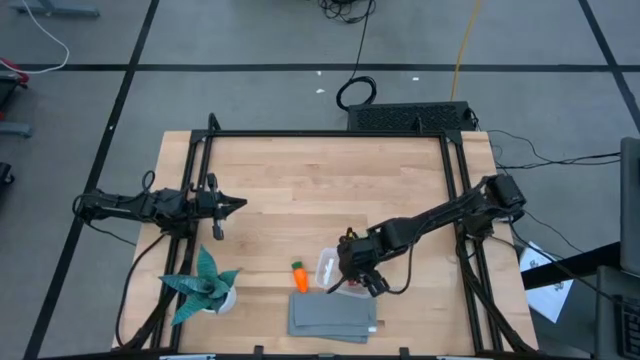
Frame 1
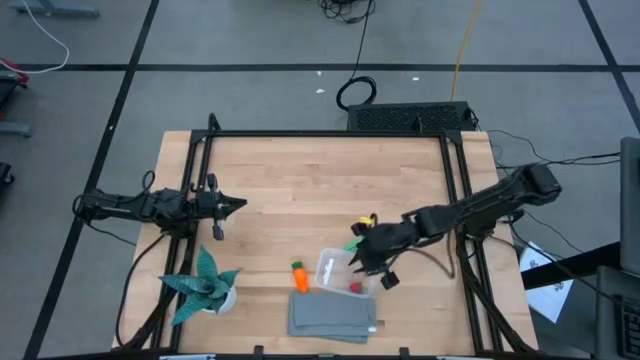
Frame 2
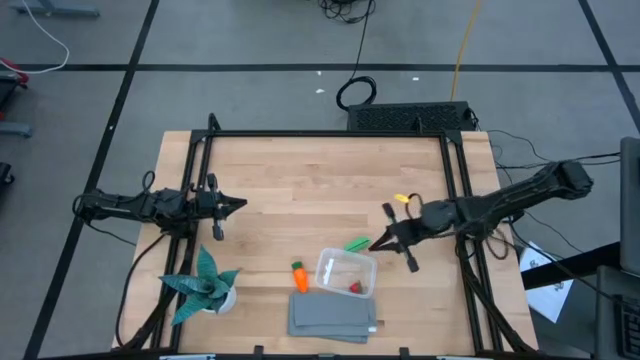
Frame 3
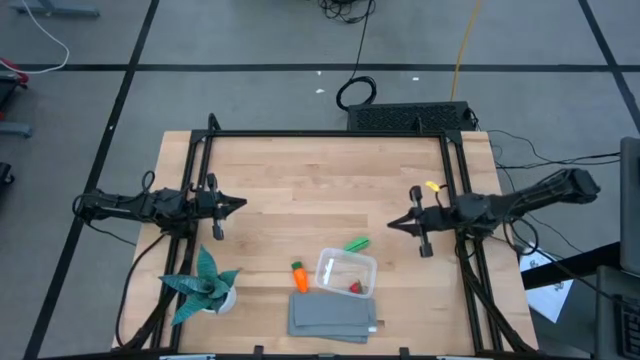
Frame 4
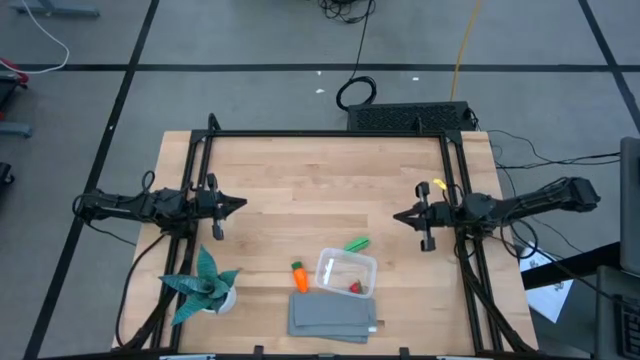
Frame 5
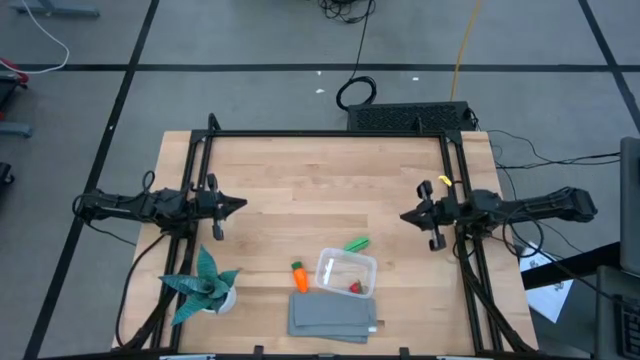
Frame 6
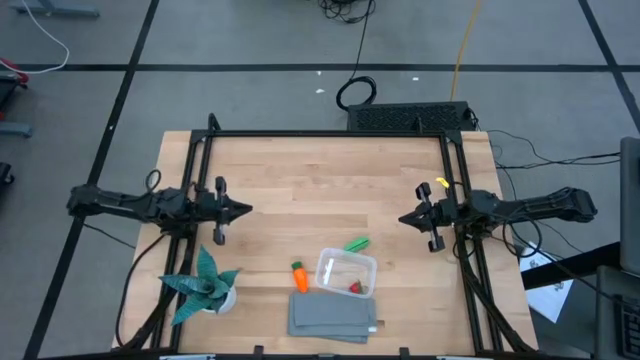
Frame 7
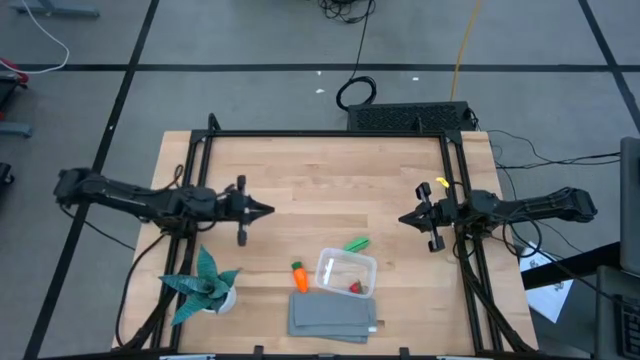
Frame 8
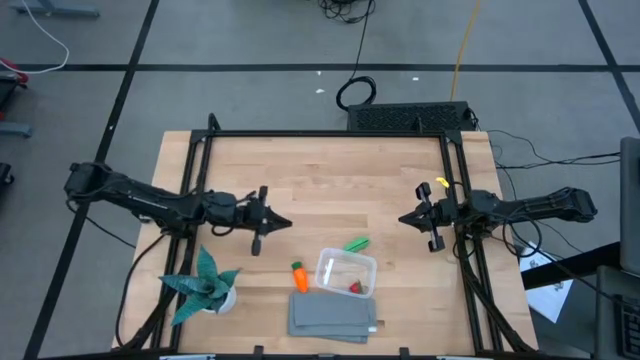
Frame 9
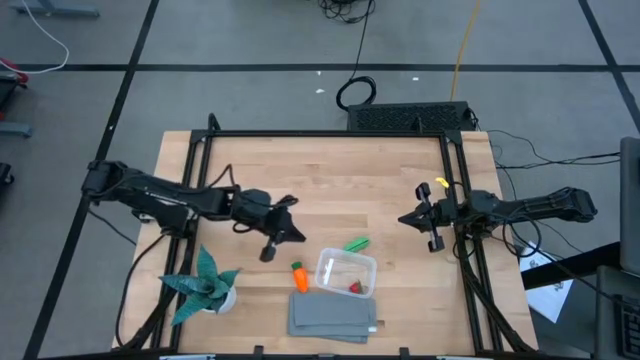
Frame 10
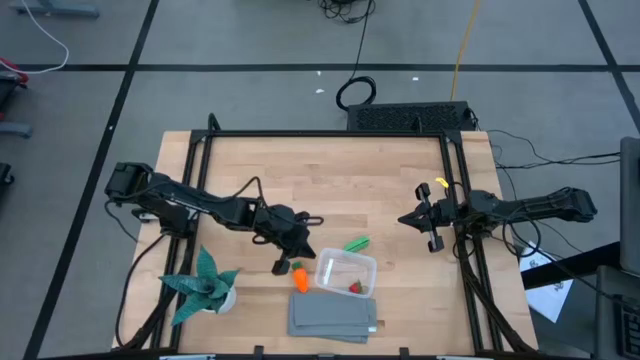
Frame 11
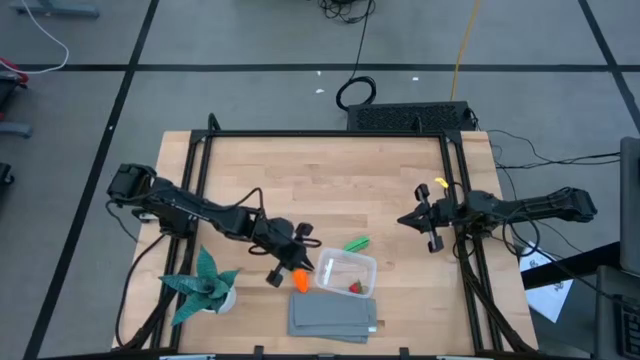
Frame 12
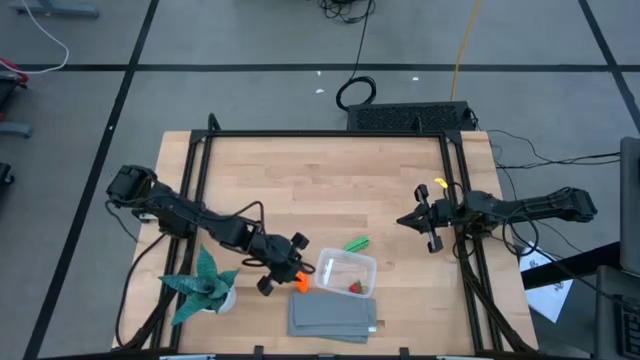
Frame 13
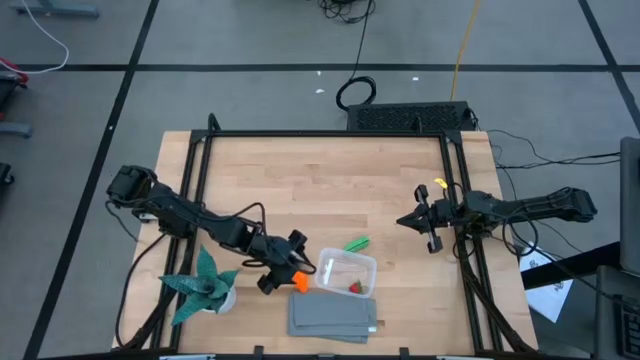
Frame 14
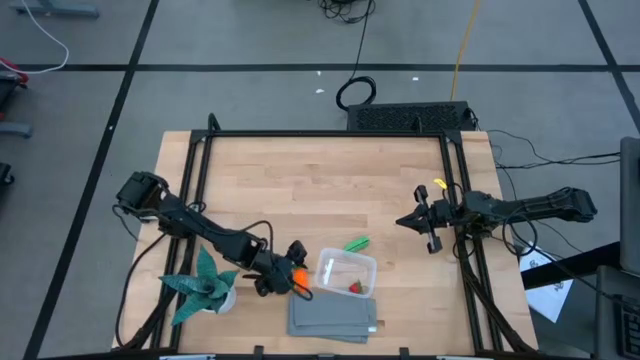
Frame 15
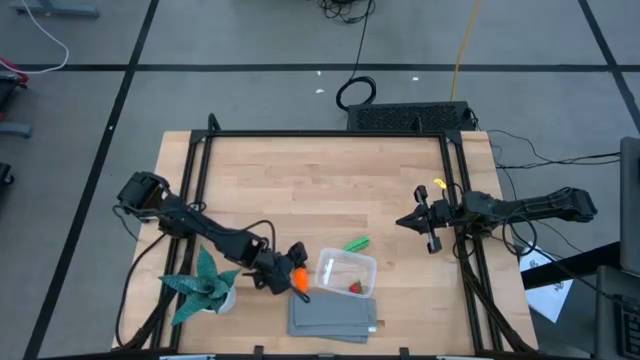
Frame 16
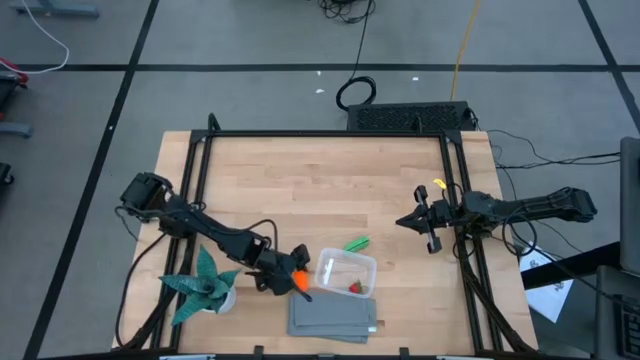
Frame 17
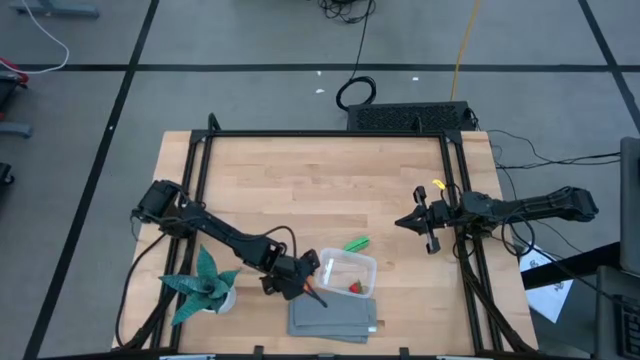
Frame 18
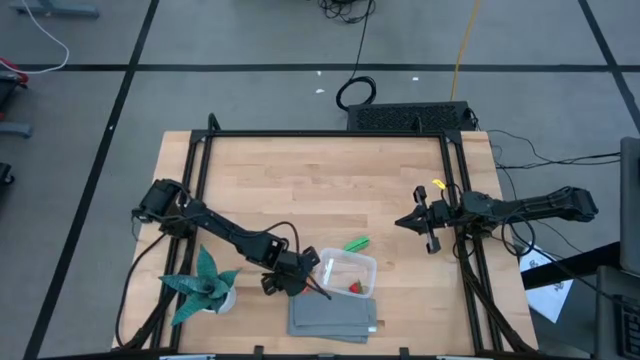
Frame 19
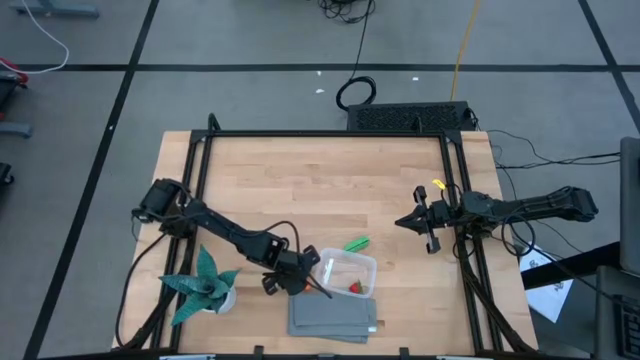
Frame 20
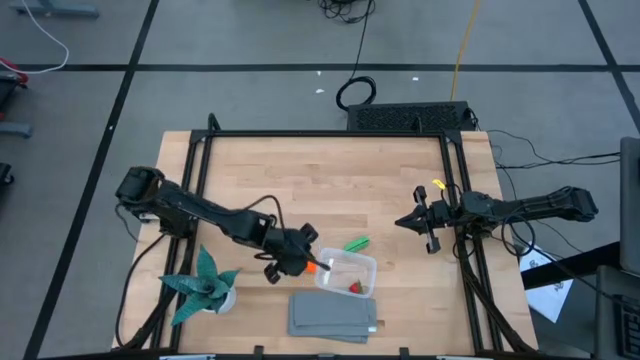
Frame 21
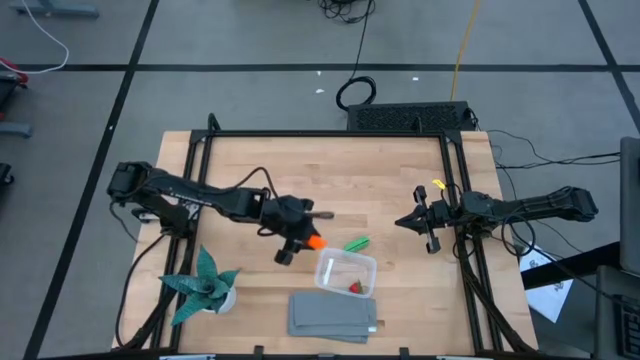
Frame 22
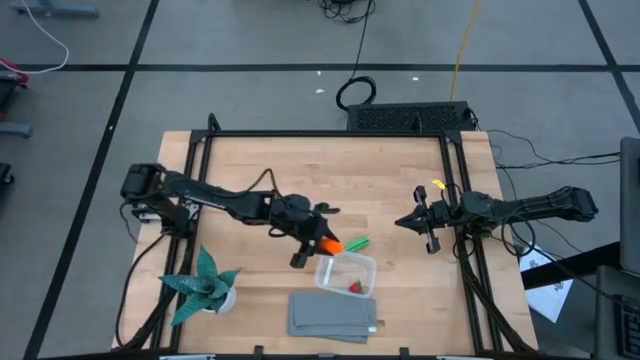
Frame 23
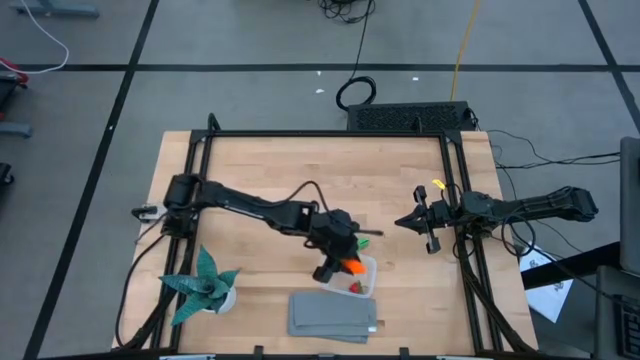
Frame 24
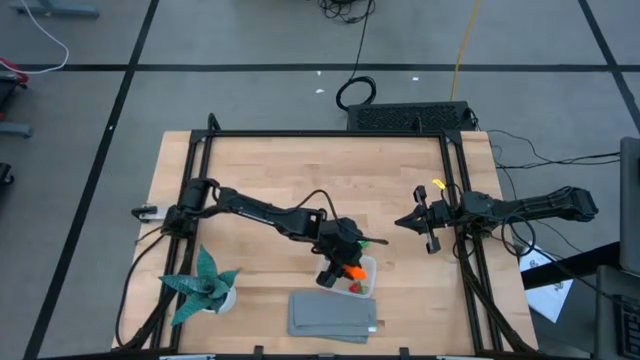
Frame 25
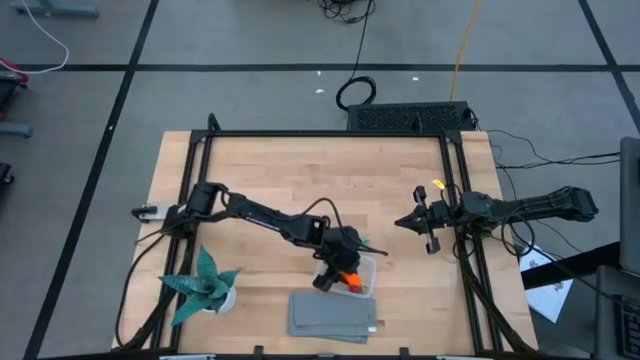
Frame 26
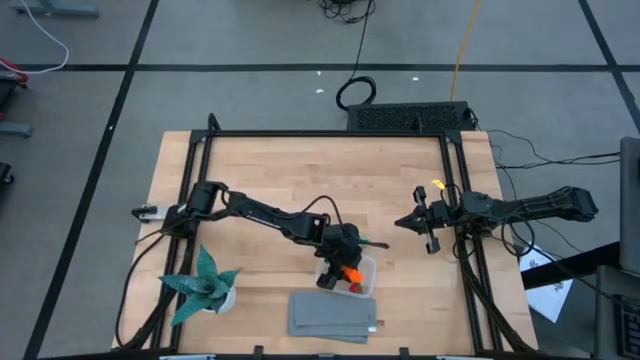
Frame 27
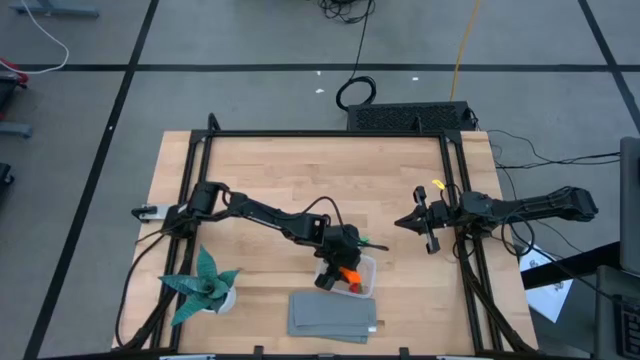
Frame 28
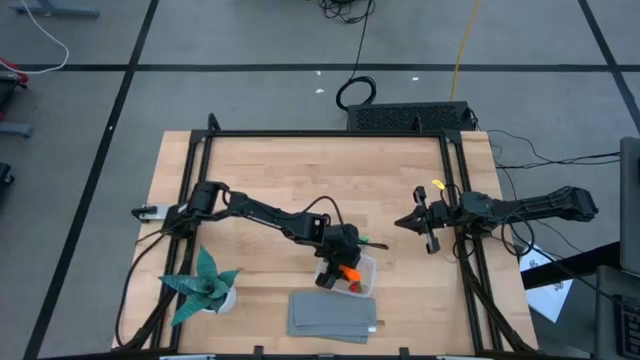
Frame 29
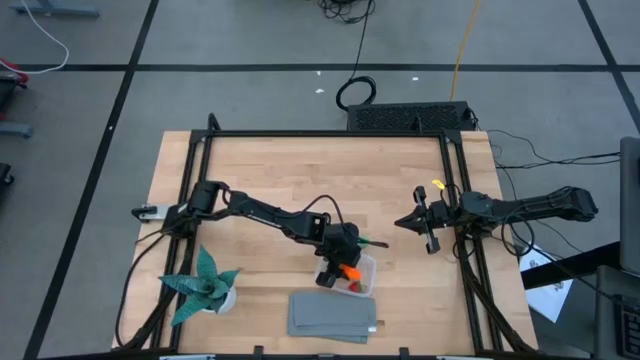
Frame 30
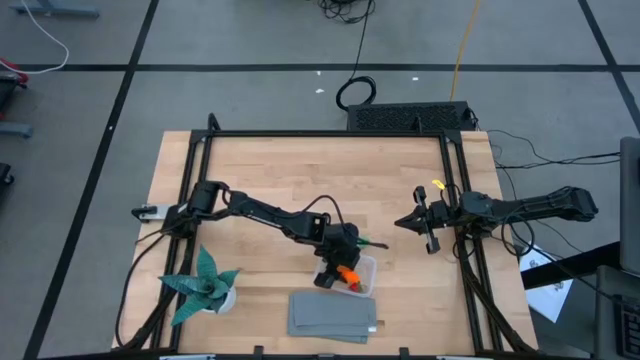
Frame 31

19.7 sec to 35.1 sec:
Task: Pick and placing Produce into tupperware
Put the orange carrot into the transparent bin

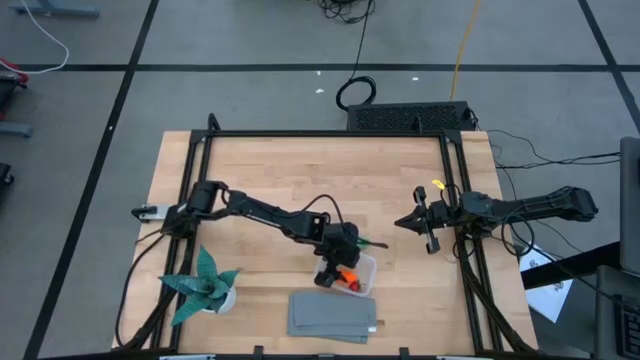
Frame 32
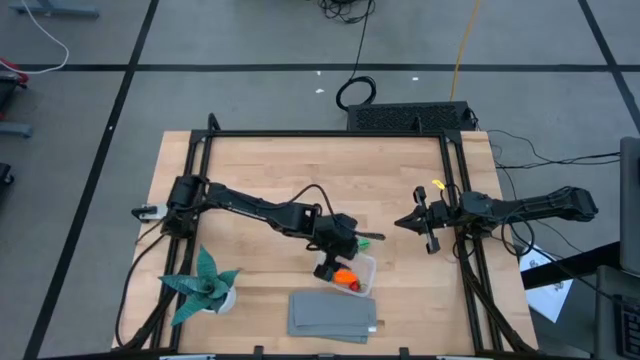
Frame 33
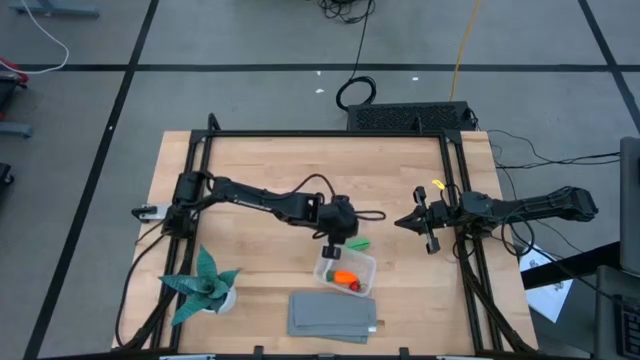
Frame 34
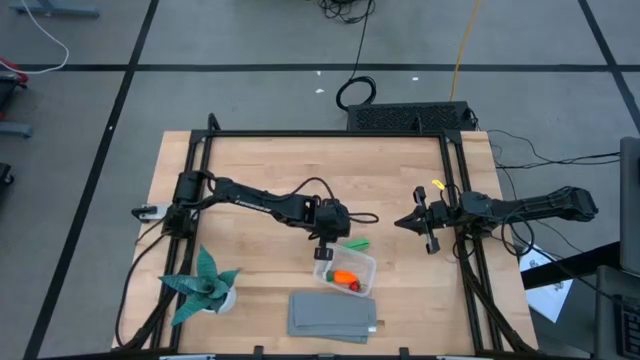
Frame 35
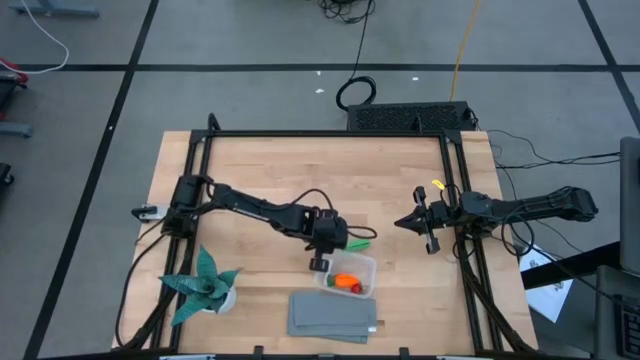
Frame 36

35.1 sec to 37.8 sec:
Adjust the transparent bin

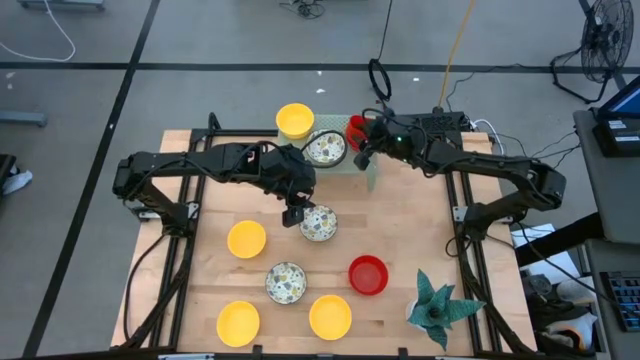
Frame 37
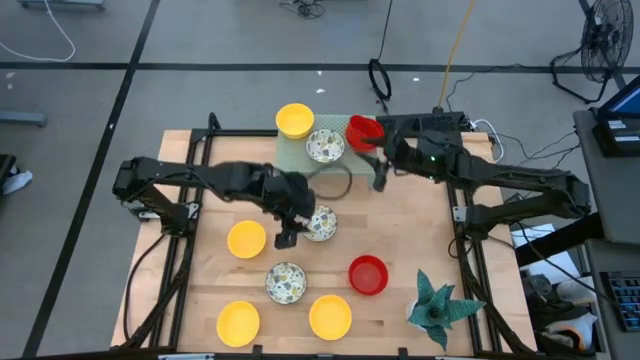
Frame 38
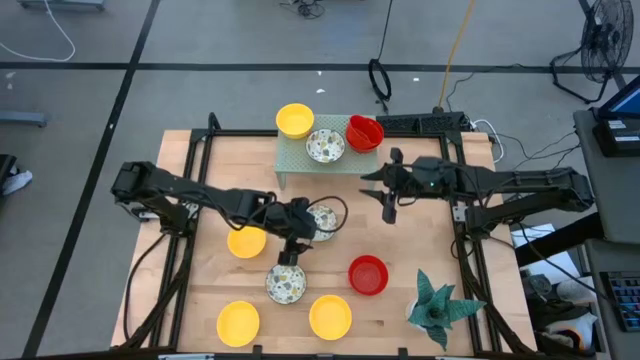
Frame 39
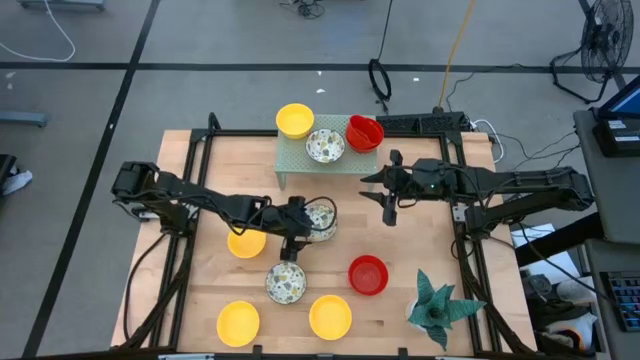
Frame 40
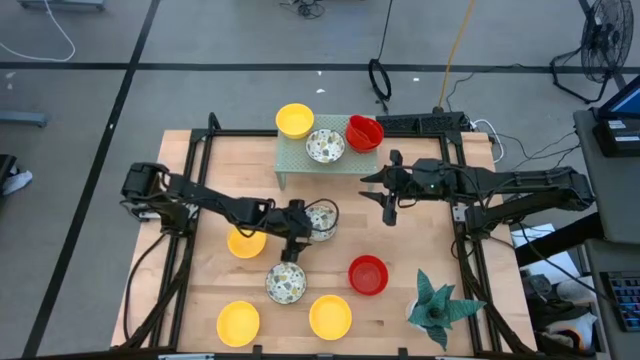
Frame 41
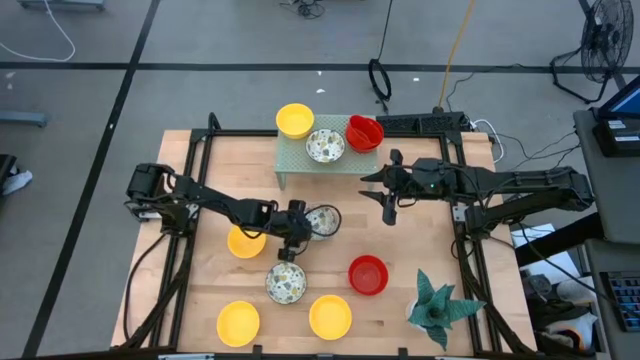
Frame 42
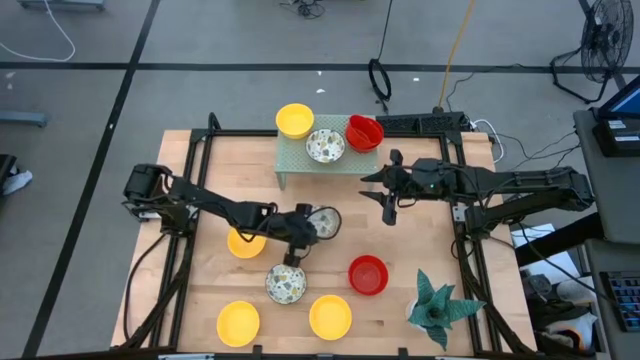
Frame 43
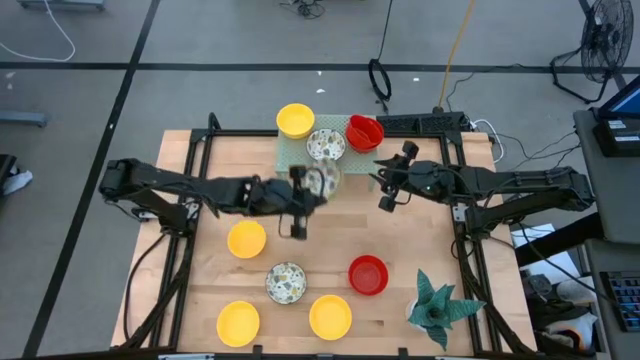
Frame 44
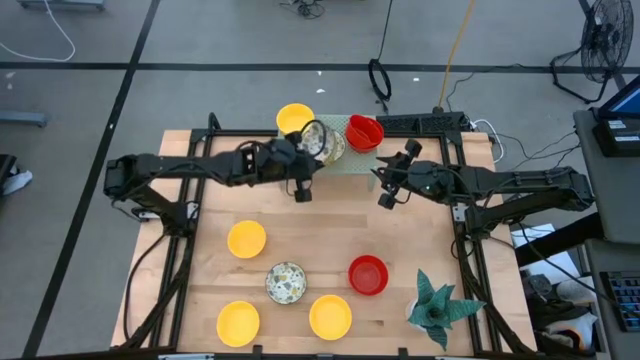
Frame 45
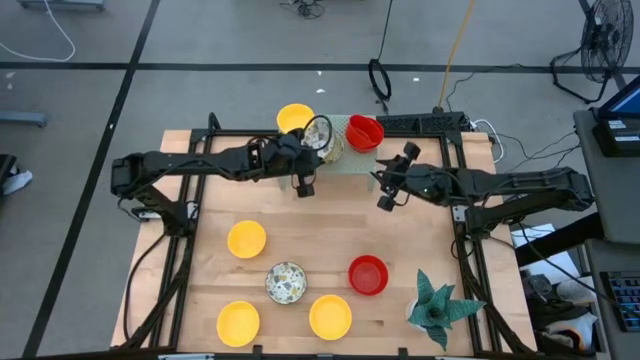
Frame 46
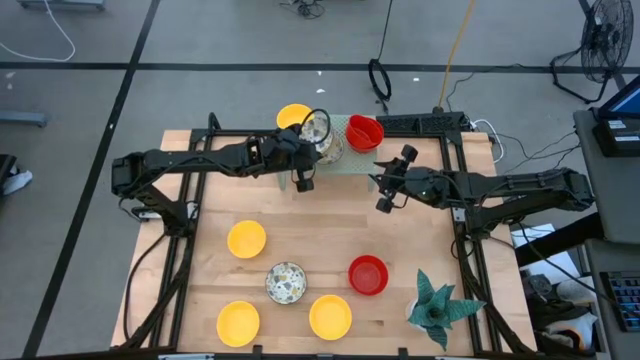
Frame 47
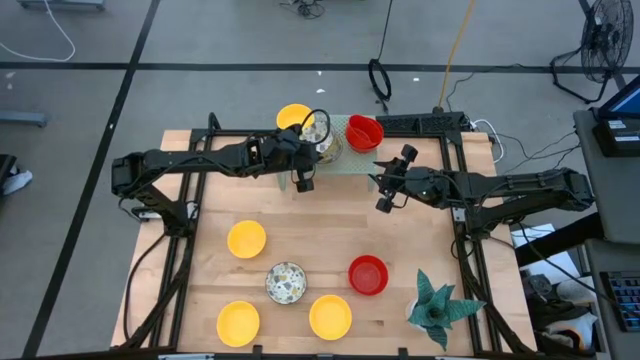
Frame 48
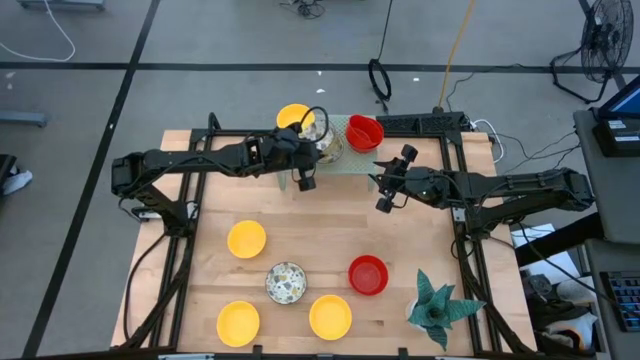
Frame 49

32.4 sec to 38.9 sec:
Task: Pick & Place Mini bowls
Stack the white bowl on top of the white bowl on the shelf
